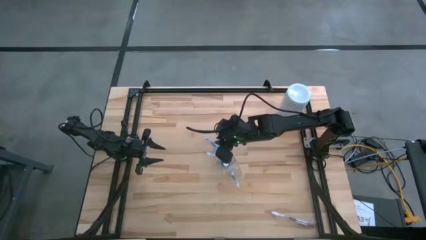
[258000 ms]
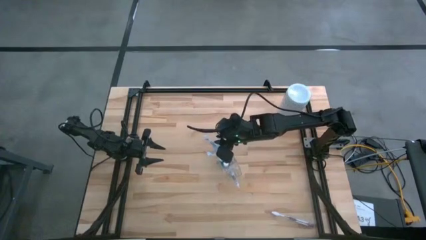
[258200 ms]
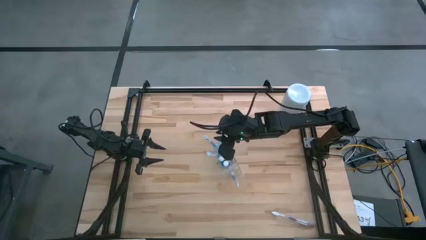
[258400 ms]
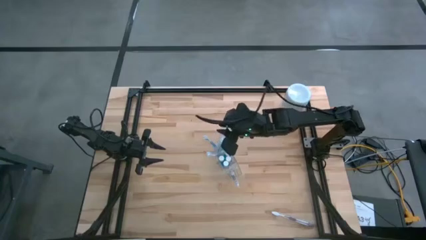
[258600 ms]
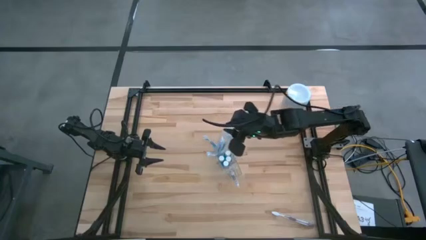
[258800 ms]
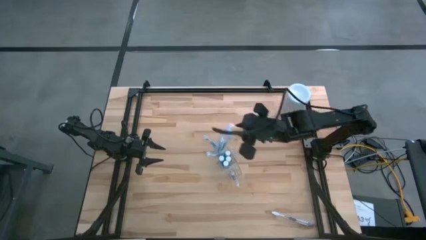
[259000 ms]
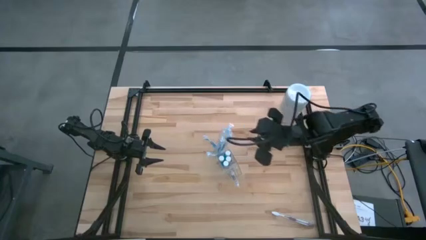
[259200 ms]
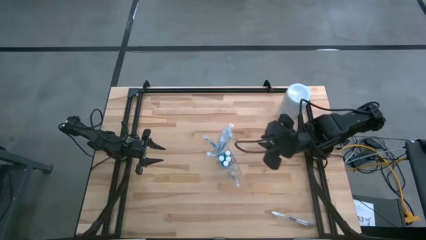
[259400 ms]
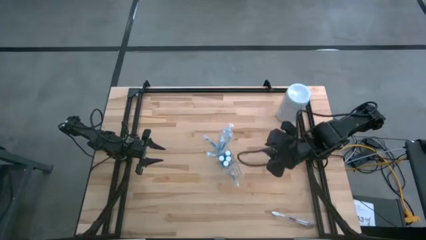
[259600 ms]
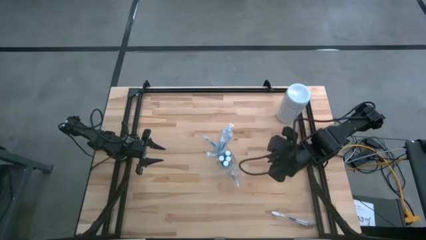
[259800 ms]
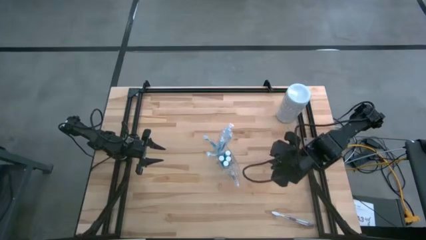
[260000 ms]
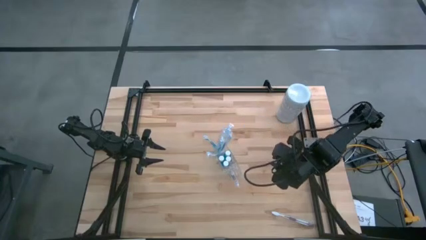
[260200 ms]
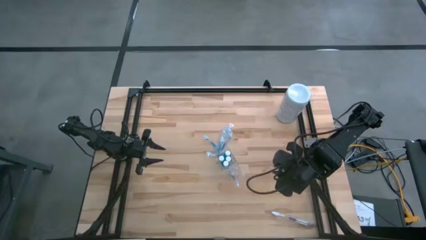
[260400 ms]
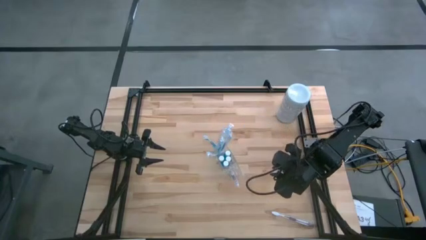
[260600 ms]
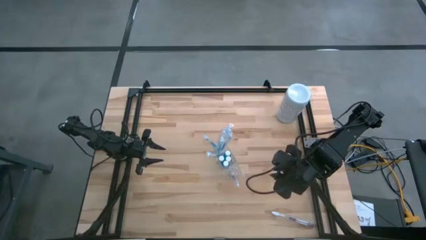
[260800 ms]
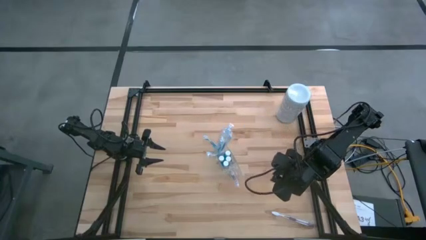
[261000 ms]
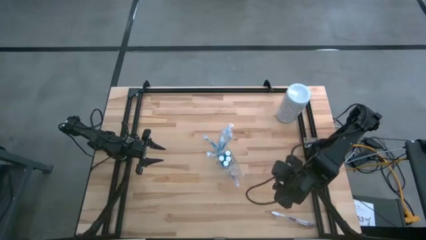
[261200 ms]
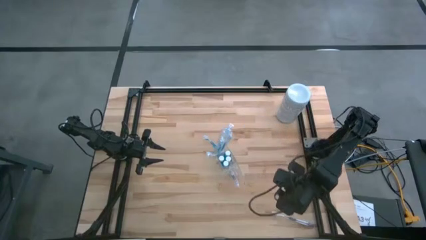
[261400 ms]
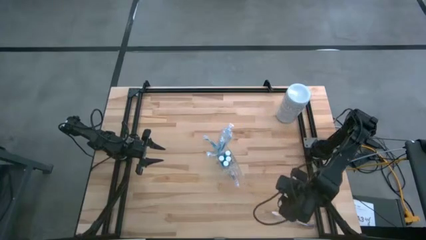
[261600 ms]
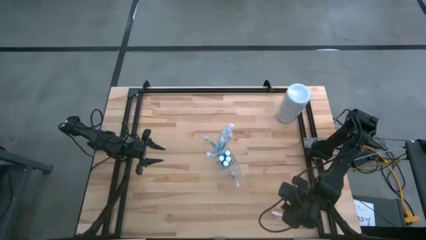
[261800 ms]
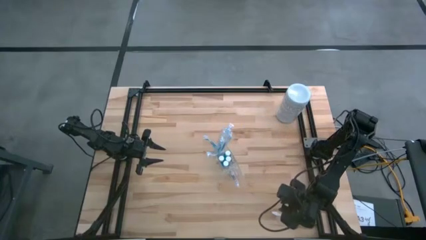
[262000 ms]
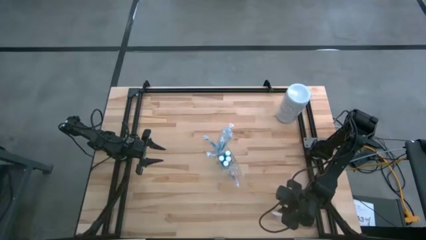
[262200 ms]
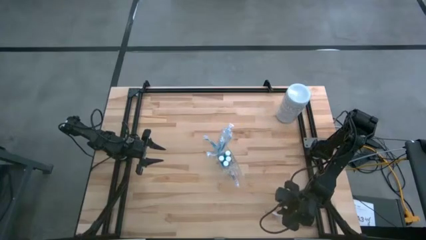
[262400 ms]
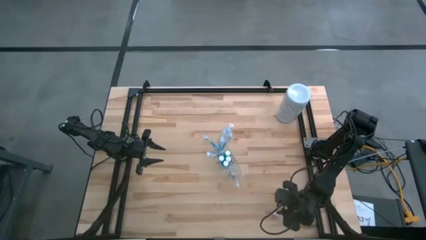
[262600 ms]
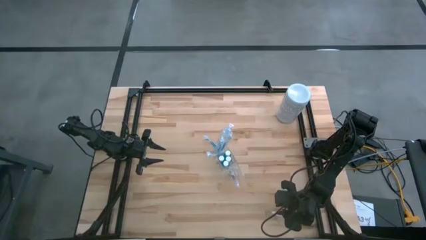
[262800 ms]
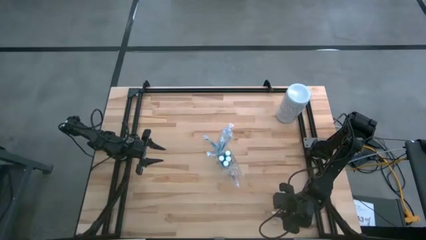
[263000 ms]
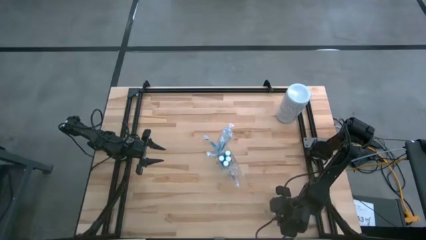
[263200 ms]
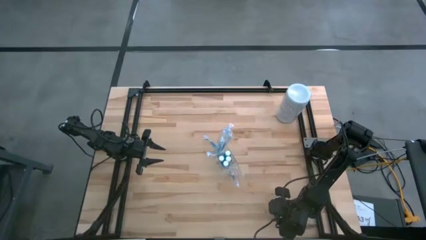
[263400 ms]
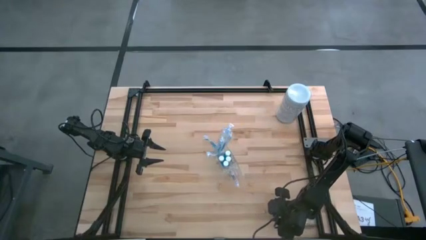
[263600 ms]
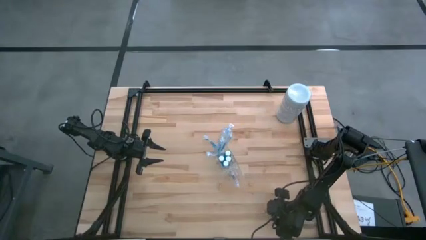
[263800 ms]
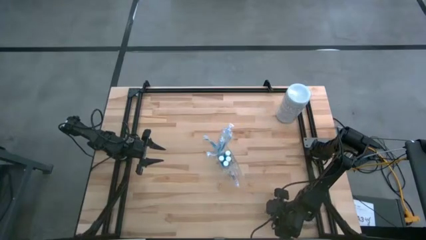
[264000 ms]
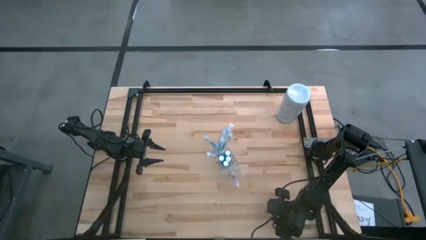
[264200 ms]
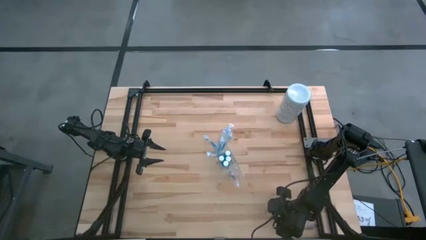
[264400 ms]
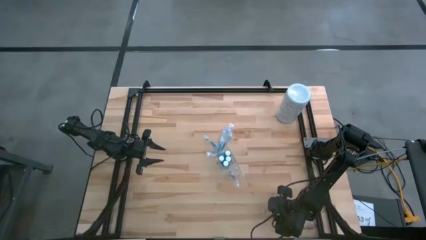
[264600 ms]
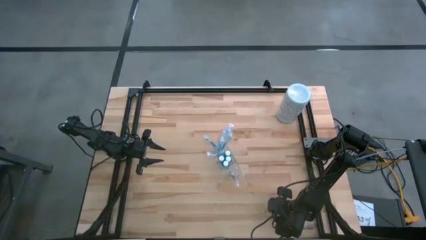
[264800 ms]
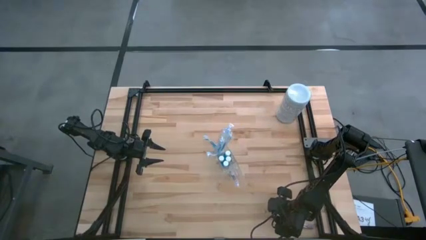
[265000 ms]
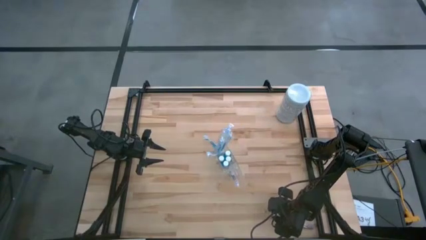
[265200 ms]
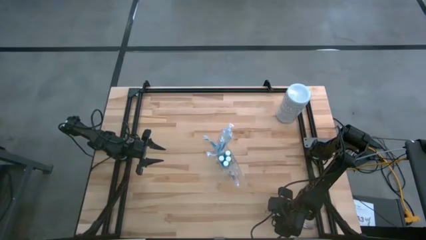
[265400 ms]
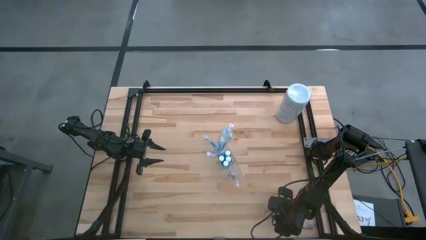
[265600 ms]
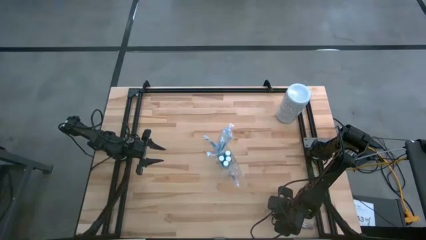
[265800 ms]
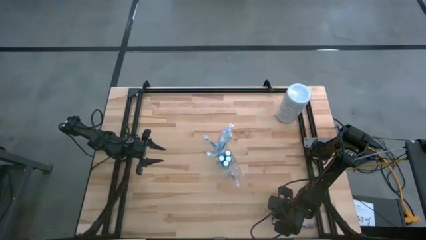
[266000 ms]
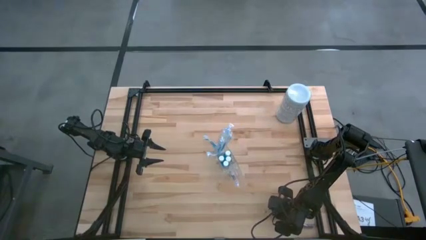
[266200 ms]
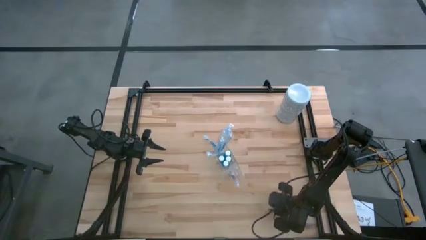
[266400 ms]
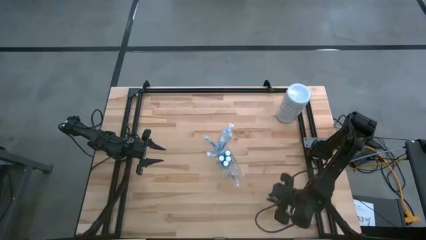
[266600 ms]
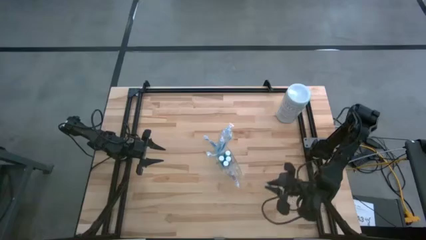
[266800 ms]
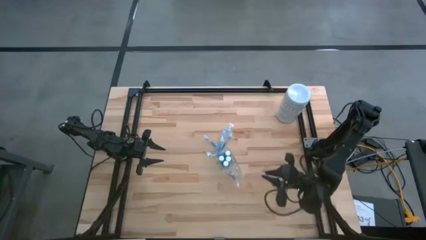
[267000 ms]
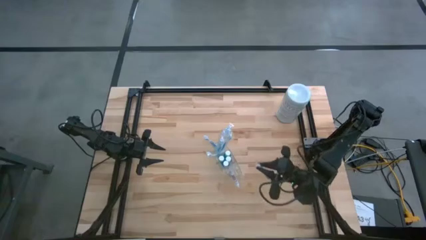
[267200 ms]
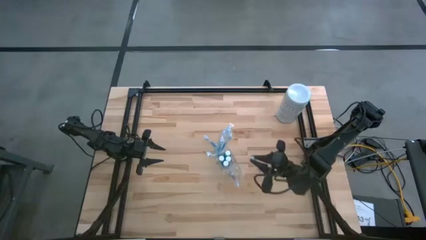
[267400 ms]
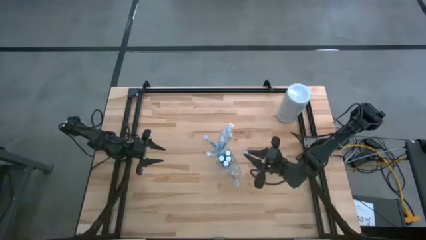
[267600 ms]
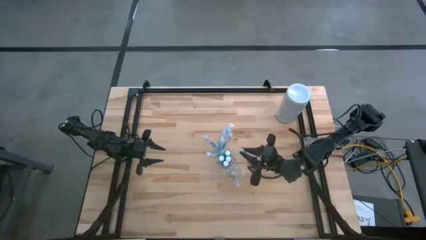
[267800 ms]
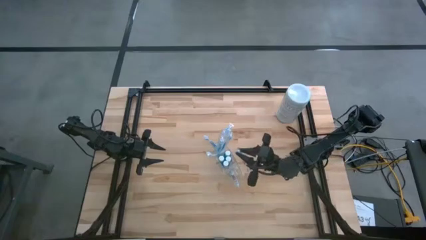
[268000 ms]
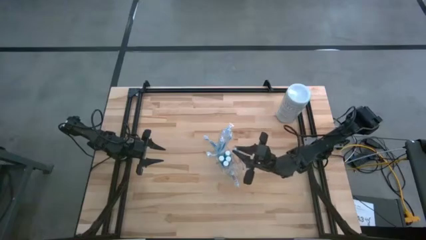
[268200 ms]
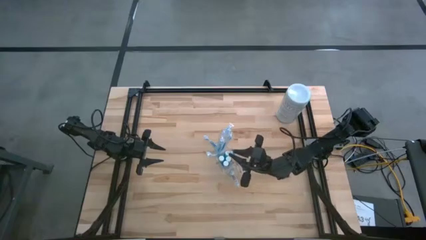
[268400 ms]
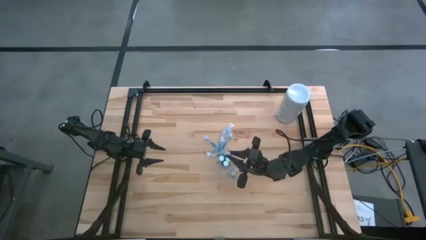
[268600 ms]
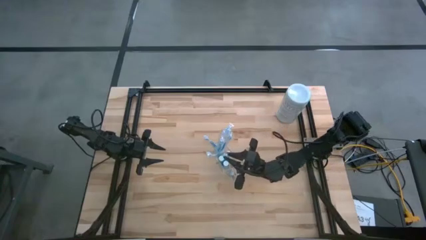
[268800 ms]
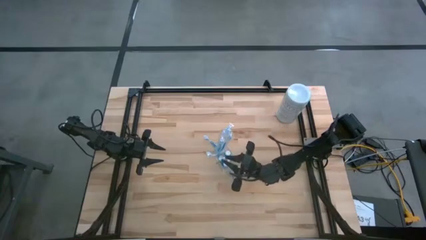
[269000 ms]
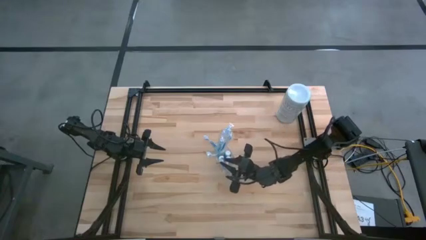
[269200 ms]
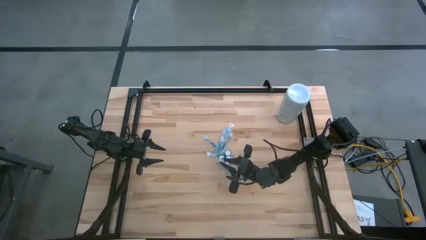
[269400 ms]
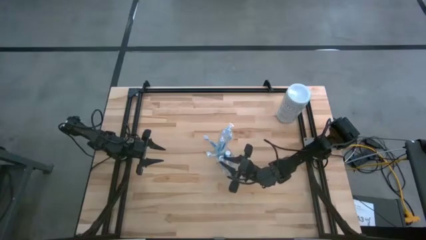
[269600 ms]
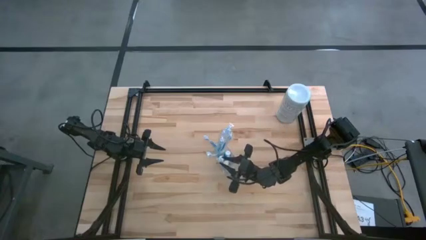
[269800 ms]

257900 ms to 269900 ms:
Task: Pick & Place toothbrushing station
Put the purple toothbrush into the right section of the transparent organizer
